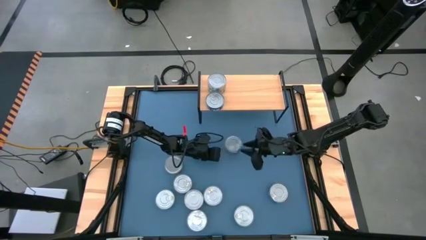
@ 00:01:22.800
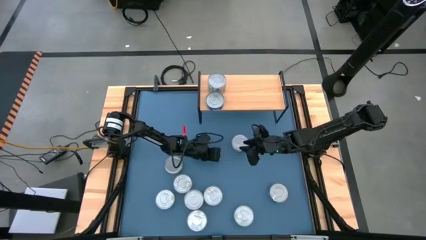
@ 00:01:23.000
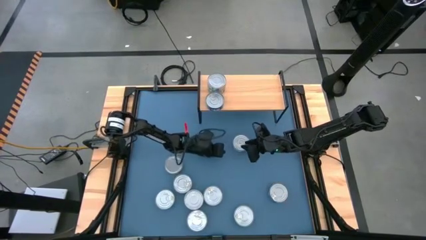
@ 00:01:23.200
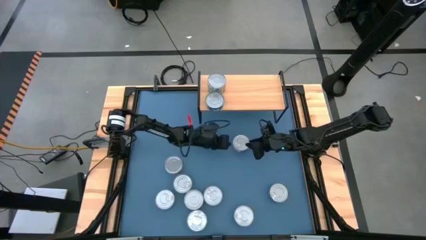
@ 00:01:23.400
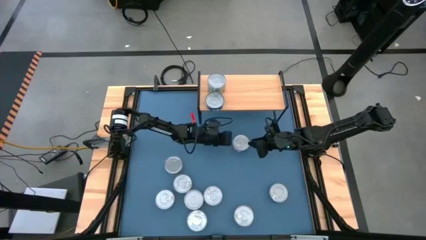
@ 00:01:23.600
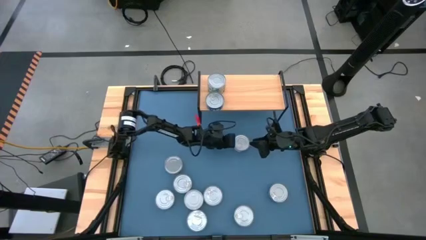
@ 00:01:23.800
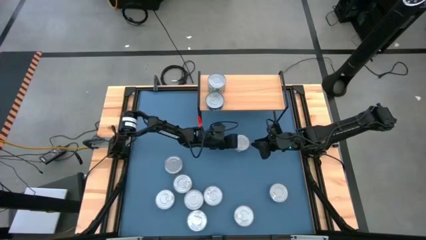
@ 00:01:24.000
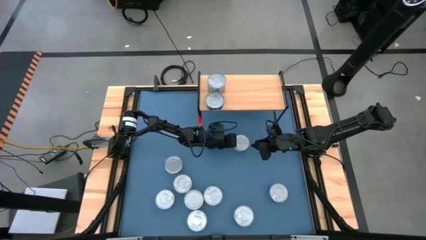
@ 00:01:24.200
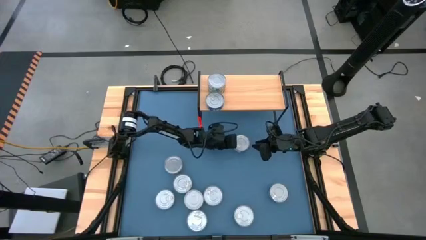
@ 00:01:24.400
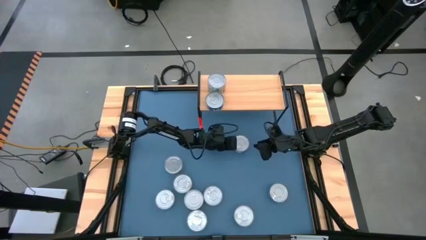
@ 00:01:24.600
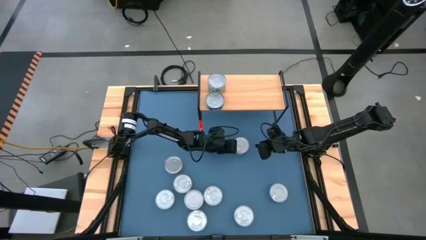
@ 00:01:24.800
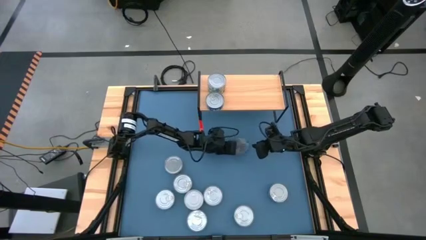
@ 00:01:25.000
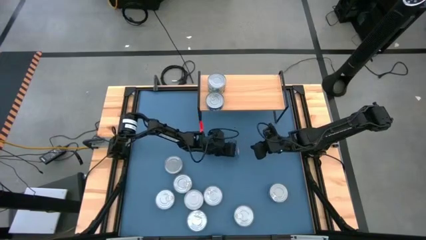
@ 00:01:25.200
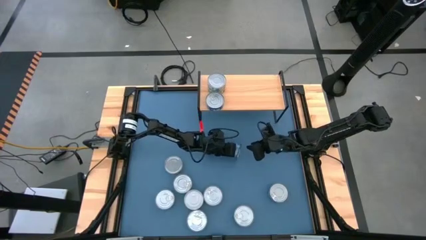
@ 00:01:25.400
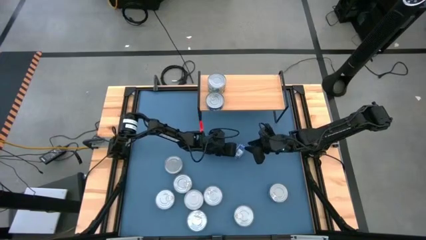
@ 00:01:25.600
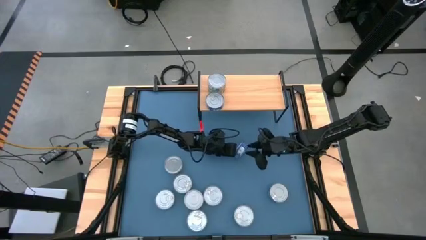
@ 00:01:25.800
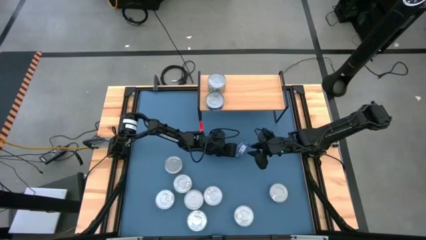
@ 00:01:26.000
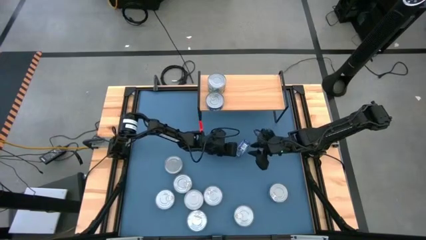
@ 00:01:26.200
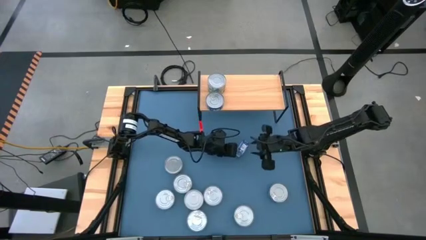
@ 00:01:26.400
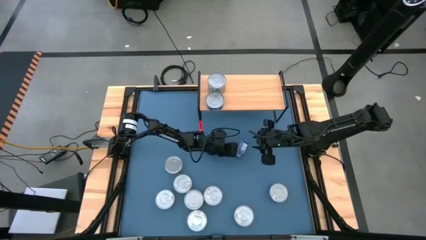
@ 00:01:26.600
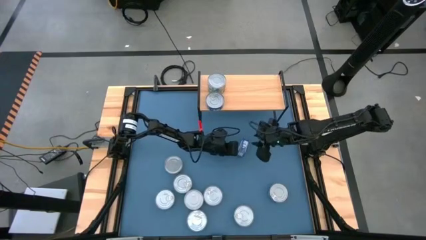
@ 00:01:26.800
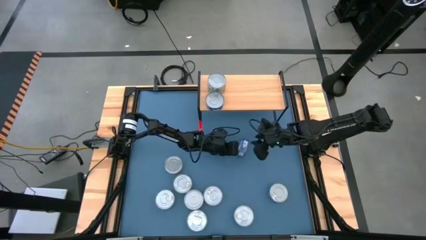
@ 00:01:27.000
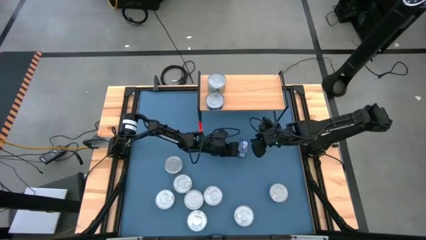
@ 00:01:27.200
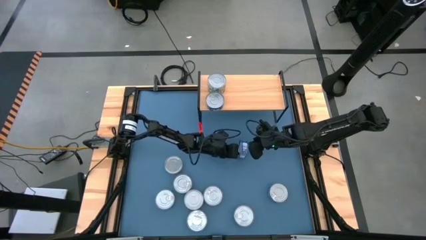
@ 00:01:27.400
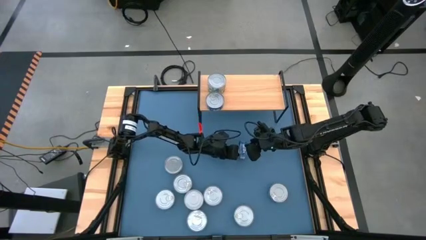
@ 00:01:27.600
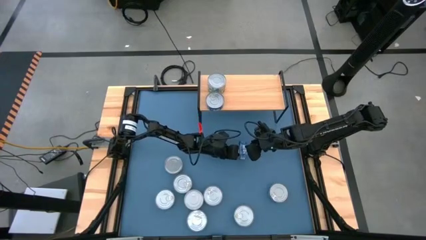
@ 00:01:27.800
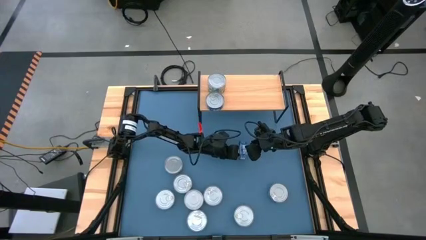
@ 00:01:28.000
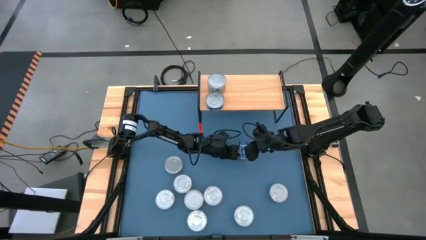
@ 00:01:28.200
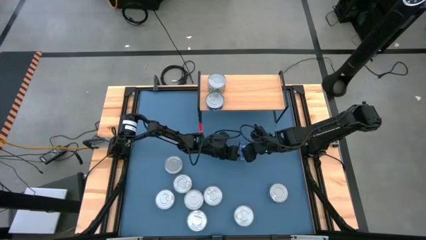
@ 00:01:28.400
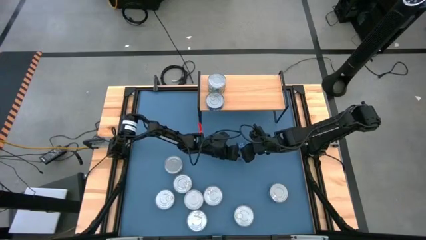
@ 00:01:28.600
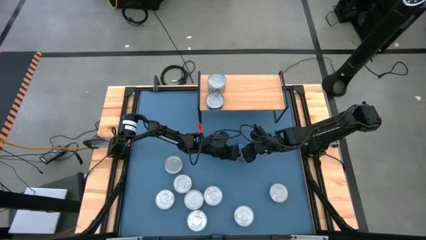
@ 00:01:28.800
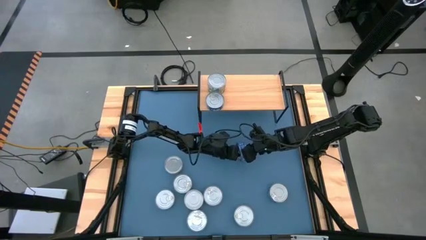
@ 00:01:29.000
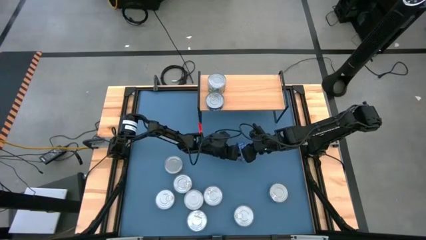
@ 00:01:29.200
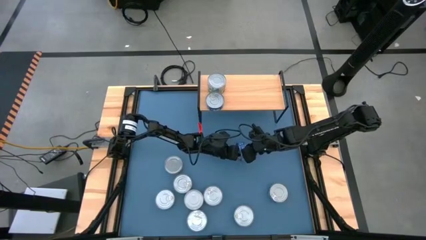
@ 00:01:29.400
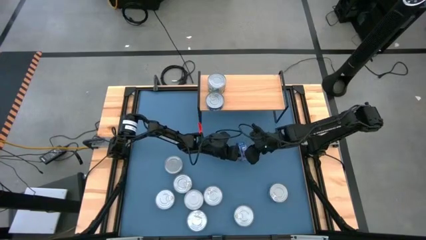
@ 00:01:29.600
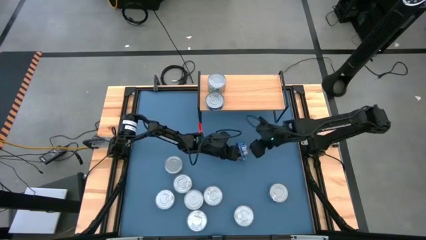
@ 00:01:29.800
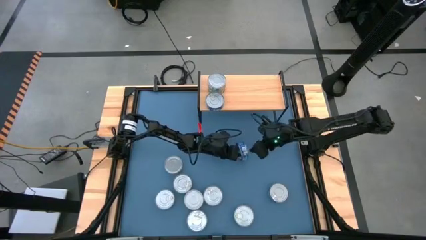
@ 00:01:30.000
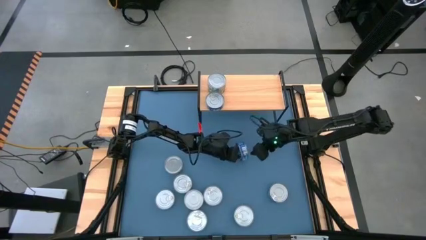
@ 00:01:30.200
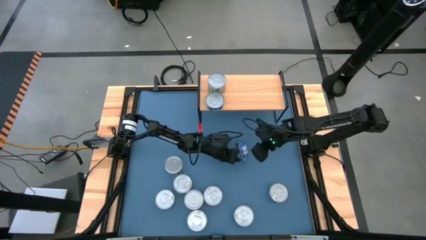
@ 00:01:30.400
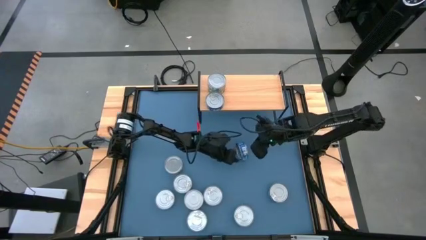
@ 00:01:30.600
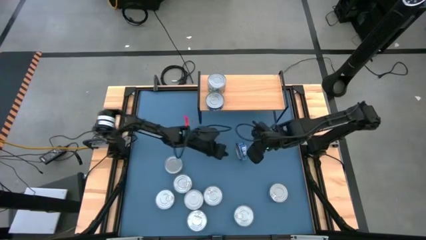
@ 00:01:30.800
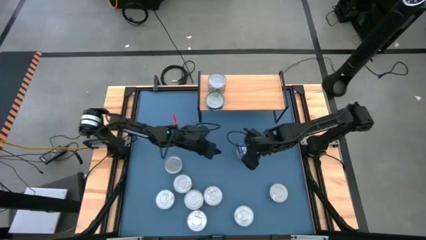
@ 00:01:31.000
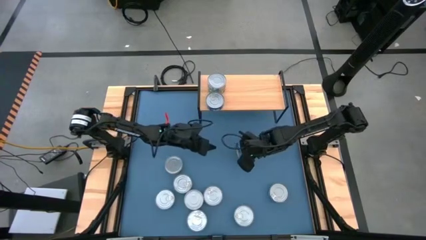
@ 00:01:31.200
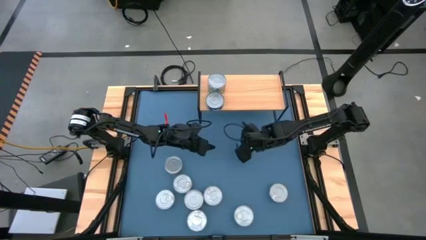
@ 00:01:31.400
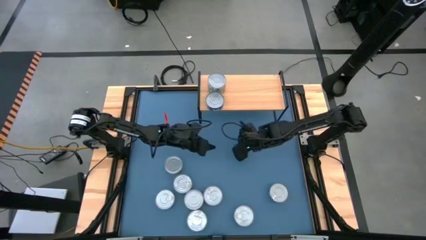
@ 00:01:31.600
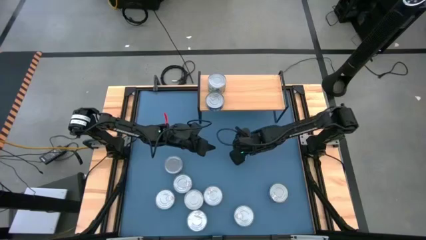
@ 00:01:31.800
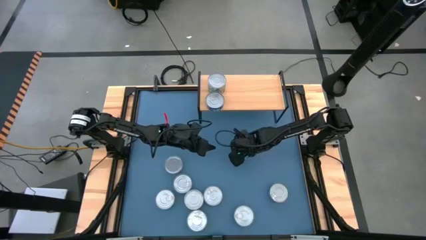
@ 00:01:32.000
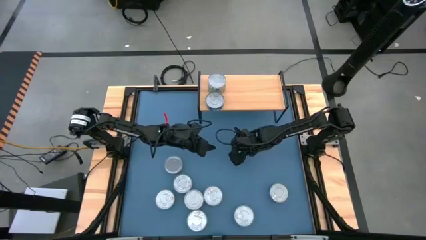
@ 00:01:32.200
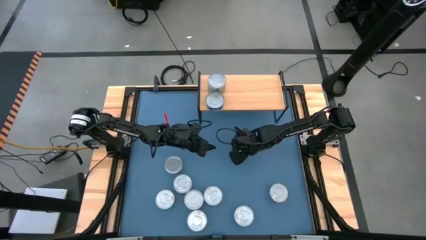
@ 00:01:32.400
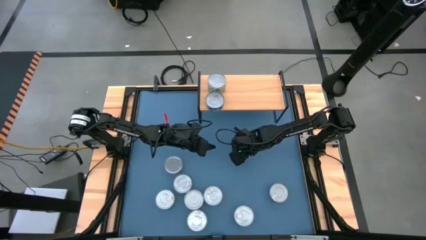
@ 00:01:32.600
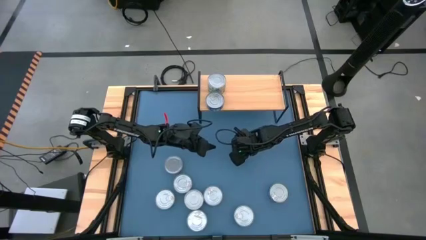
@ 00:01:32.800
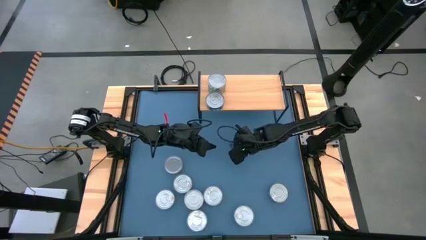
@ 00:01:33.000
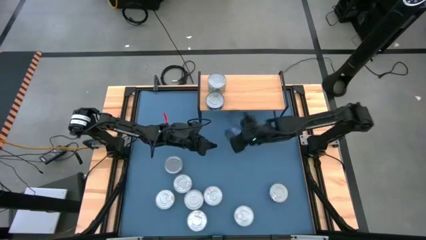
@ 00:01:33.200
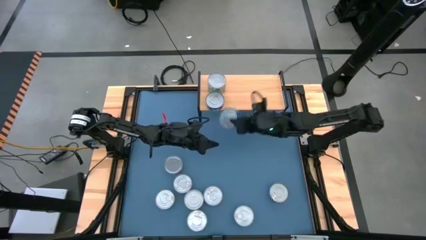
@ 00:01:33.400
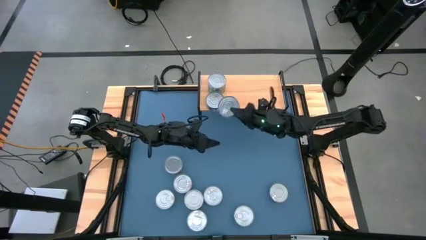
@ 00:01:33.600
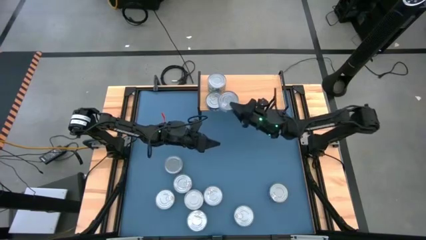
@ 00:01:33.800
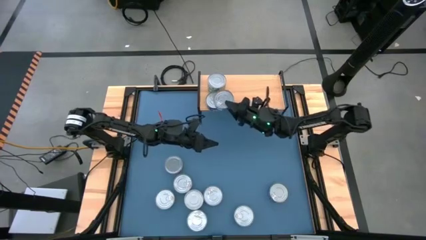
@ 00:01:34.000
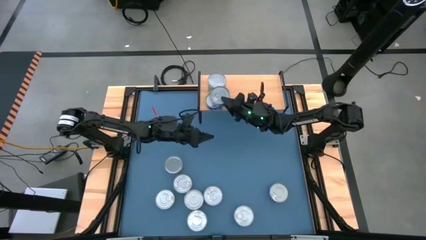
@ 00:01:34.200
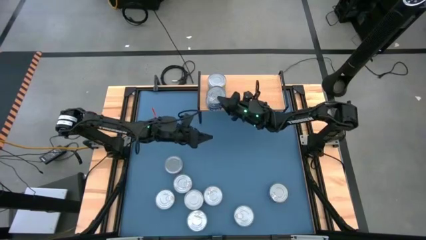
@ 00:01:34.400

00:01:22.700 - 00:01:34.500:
Task: Stack canned seafood by type on shelf
Stack the blue tuna can on top of the blue tuna can on the shelf

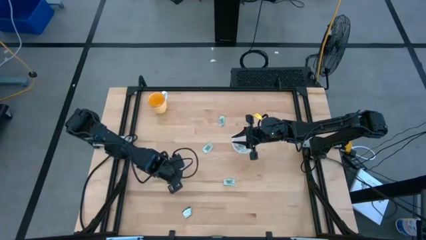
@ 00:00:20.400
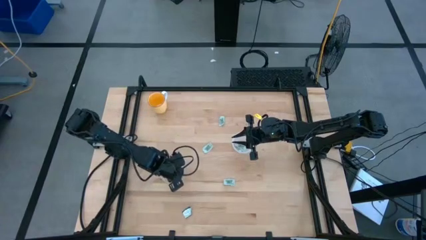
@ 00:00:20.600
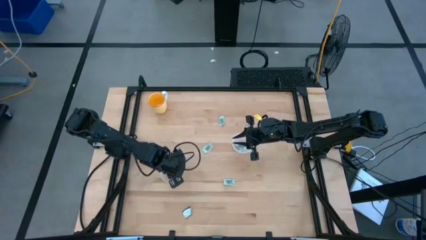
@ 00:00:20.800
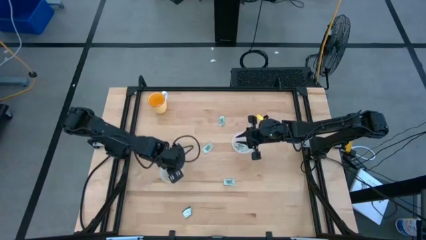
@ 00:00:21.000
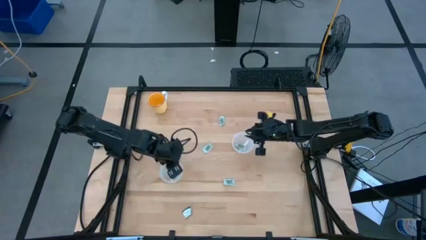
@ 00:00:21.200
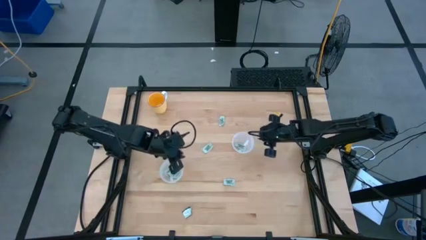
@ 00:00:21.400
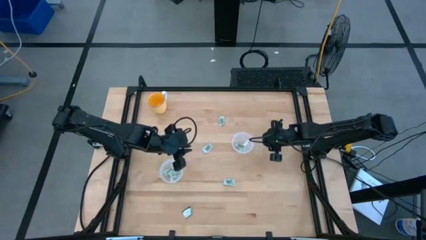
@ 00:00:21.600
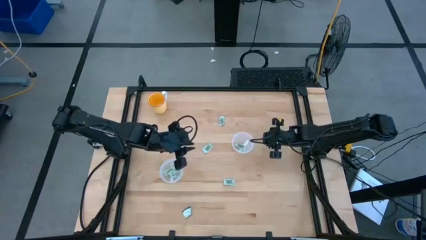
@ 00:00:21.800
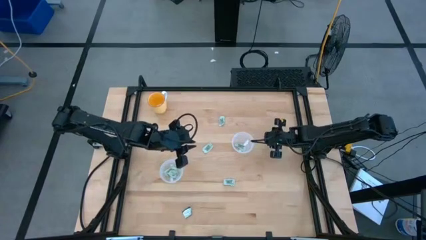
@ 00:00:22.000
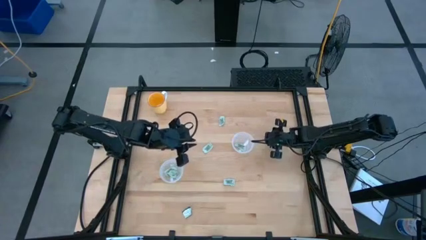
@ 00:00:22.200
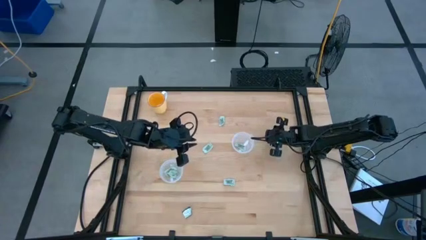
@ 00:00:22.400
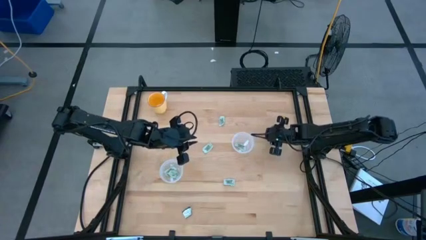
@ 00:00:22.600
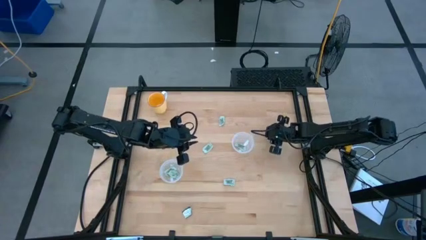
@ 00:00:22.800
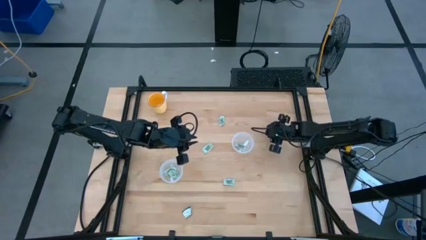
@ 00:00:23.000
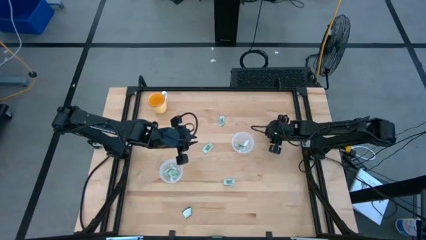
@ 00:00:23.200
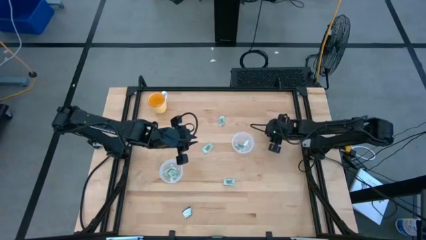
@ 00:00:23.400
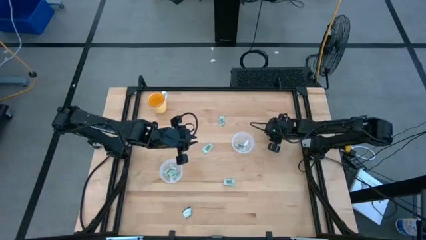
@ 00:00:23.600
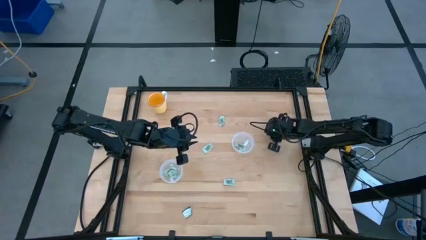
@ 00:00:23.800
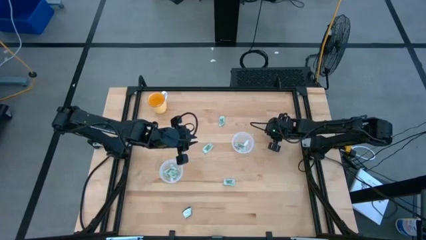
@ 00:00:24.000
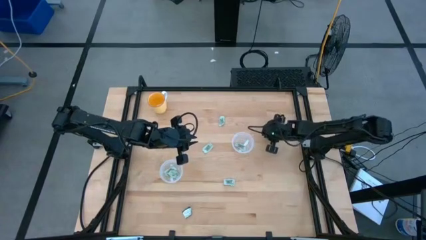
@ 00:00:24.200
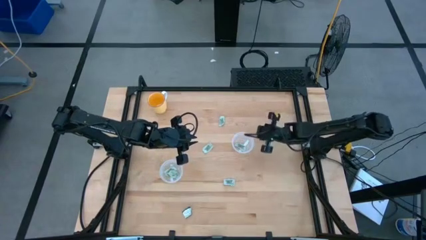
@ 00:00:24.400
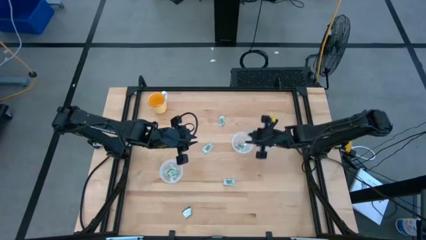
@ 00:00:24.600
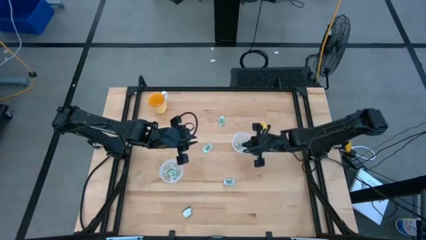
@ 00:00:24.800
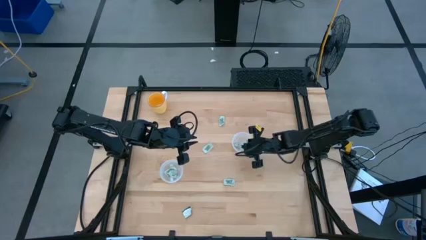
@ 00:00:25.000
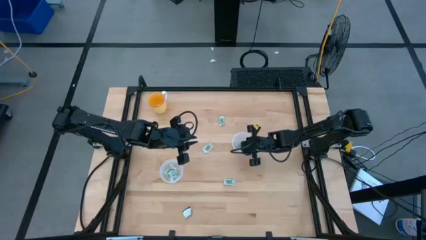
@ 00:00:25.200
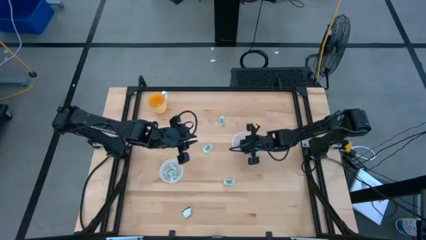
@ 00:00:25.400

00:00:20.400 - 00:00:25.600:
Task: Pick and place Stevia / Truvia into bins
Put the white stevia packet into the top transparent container
